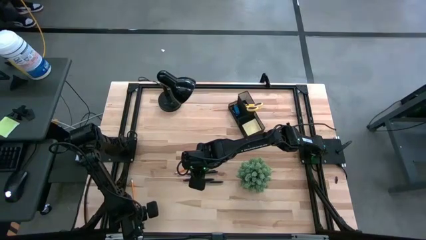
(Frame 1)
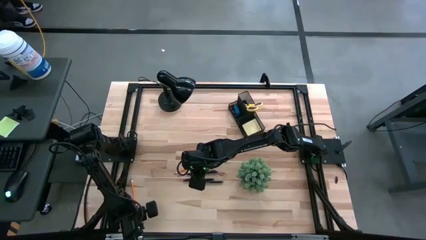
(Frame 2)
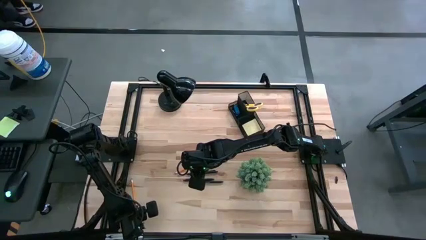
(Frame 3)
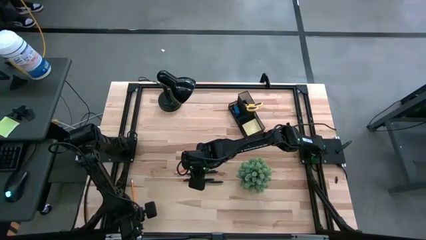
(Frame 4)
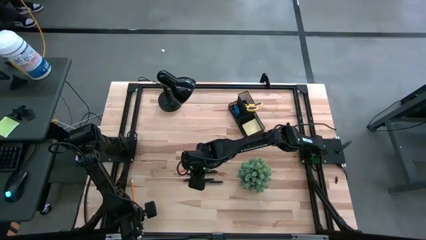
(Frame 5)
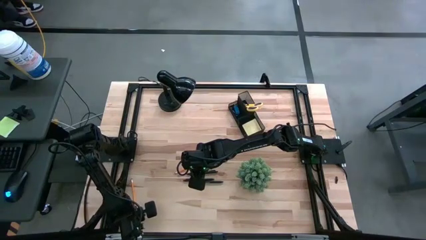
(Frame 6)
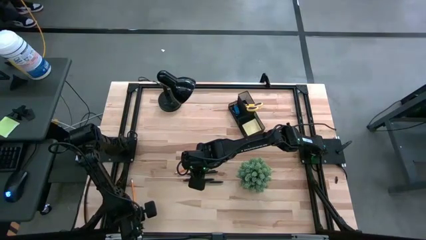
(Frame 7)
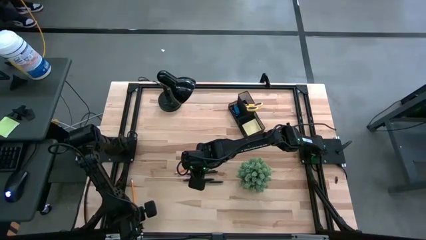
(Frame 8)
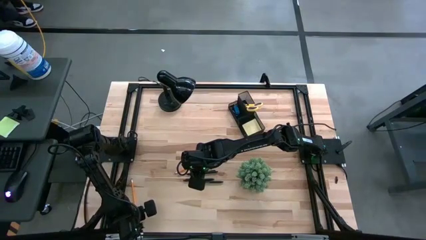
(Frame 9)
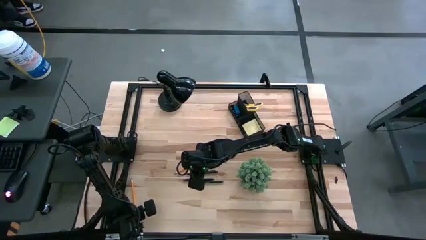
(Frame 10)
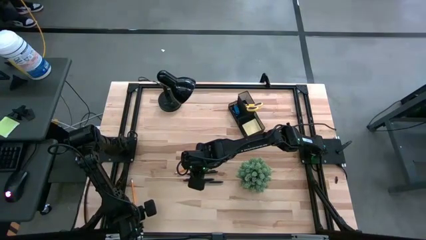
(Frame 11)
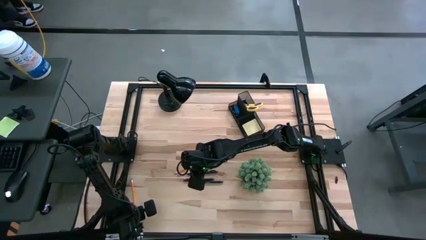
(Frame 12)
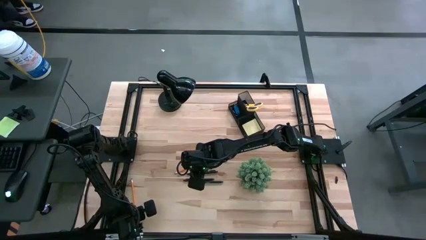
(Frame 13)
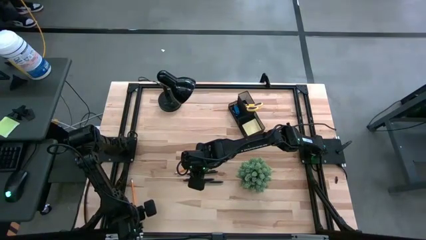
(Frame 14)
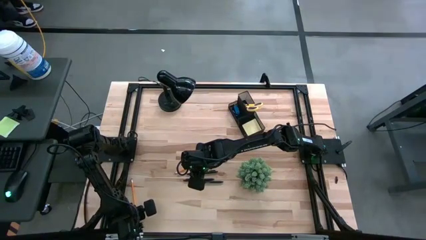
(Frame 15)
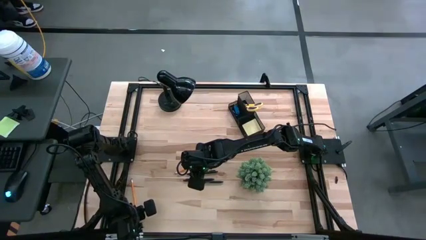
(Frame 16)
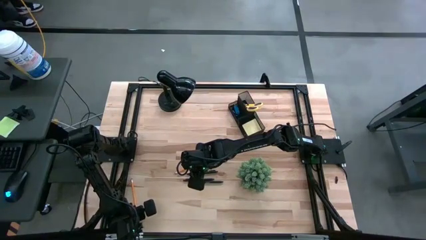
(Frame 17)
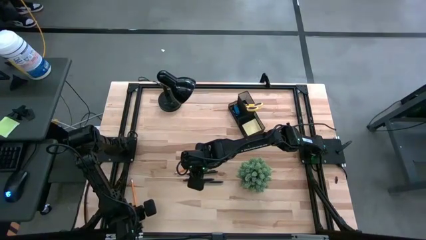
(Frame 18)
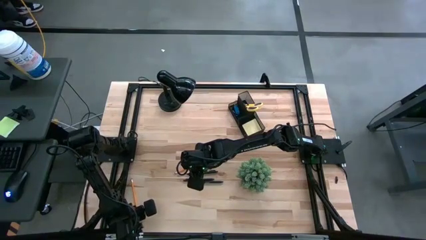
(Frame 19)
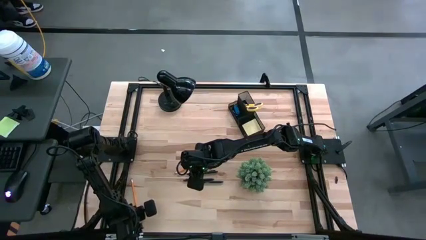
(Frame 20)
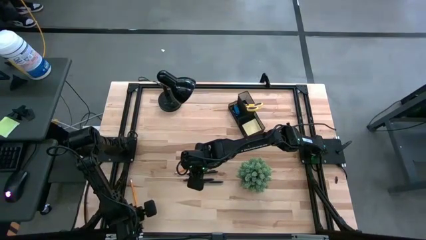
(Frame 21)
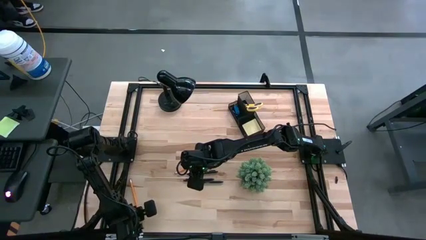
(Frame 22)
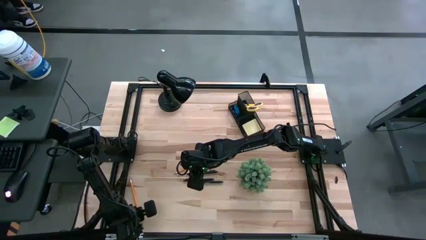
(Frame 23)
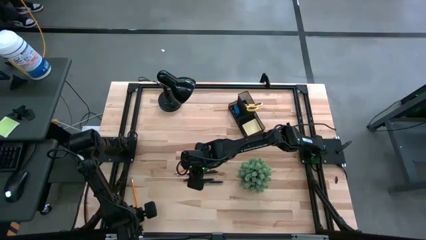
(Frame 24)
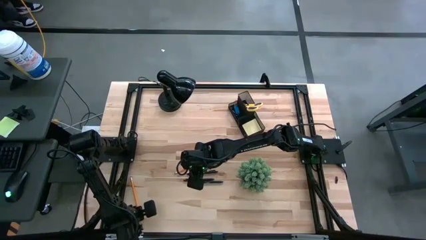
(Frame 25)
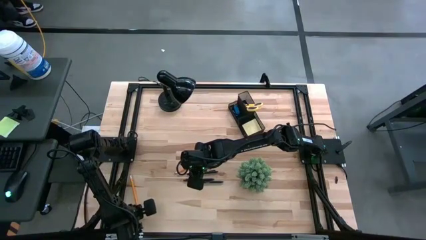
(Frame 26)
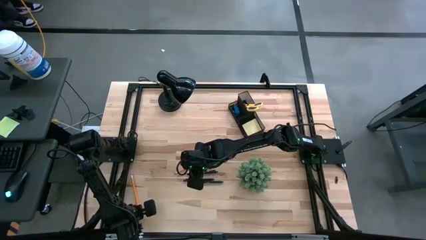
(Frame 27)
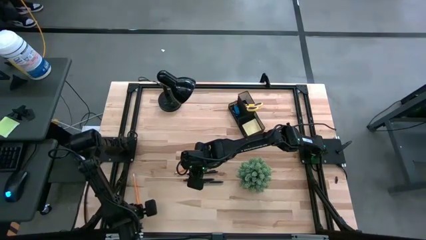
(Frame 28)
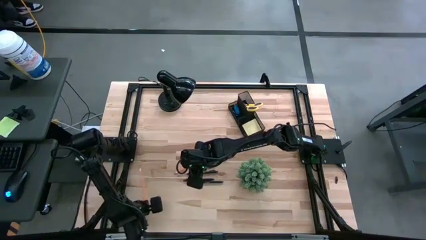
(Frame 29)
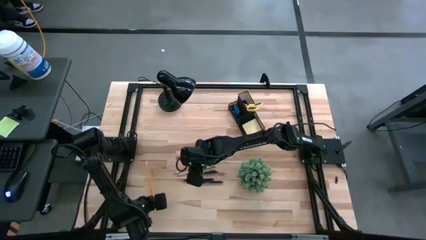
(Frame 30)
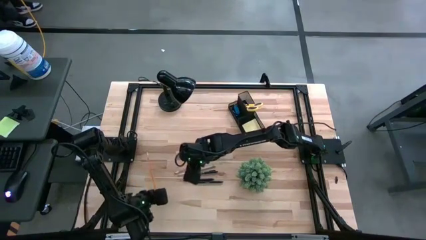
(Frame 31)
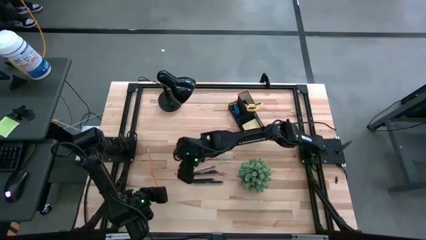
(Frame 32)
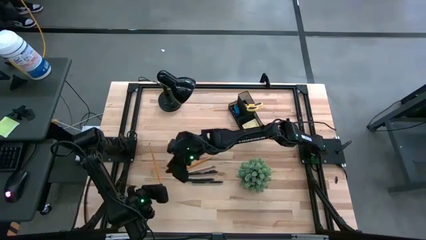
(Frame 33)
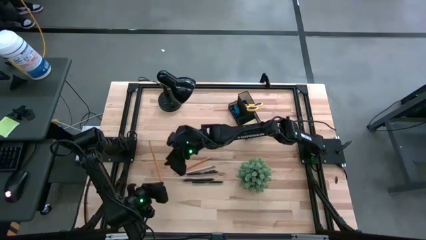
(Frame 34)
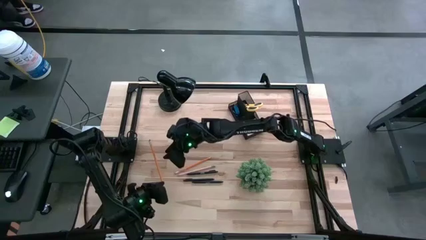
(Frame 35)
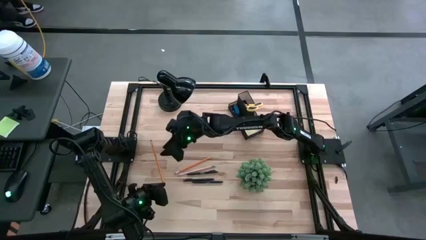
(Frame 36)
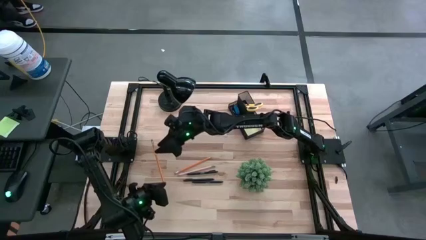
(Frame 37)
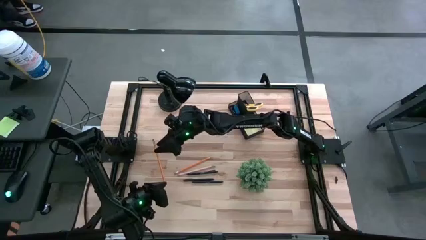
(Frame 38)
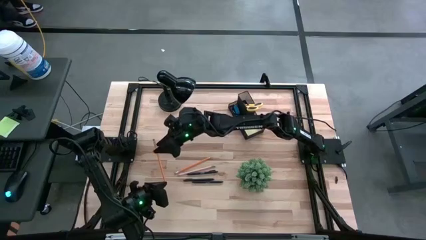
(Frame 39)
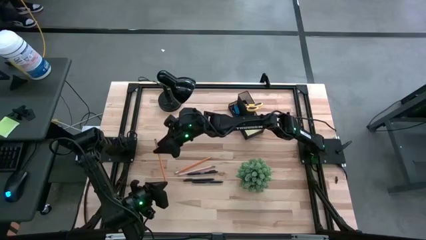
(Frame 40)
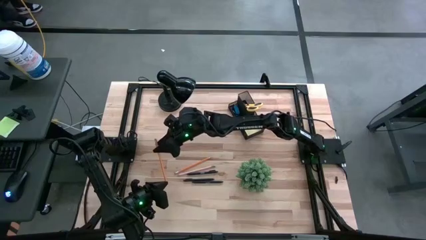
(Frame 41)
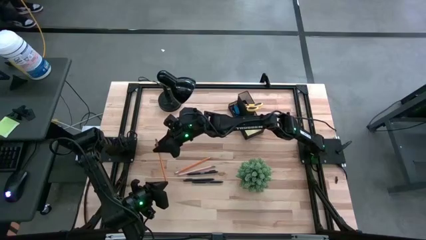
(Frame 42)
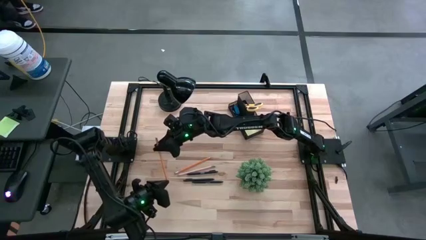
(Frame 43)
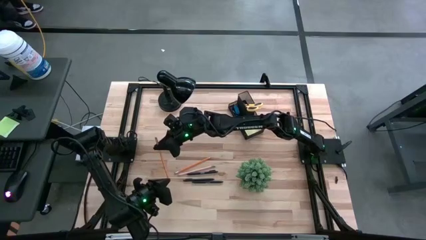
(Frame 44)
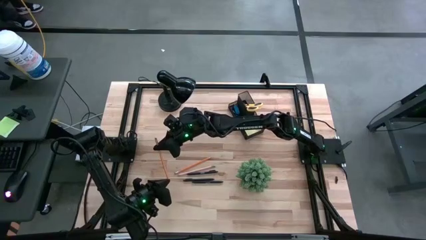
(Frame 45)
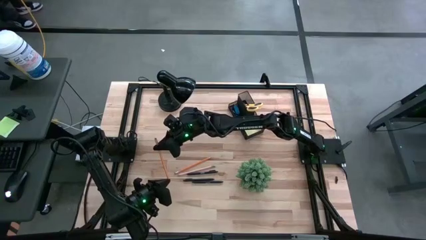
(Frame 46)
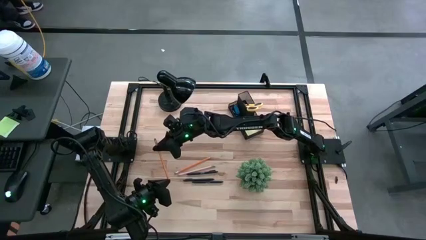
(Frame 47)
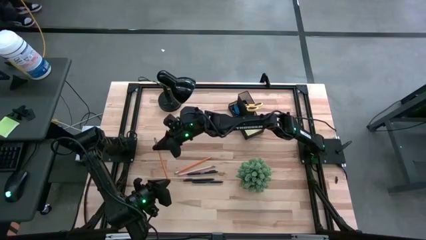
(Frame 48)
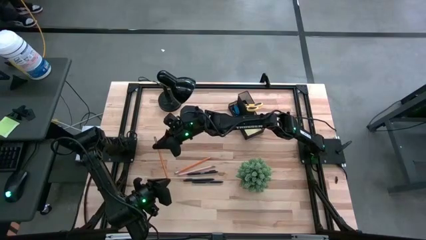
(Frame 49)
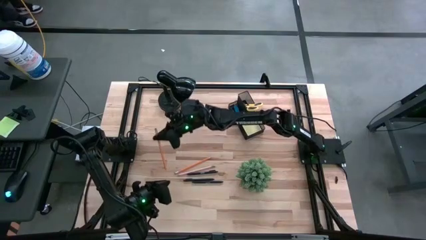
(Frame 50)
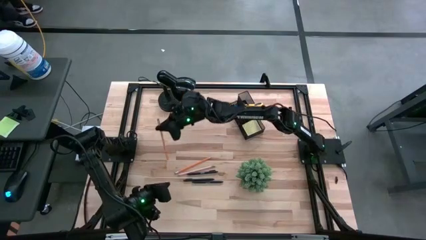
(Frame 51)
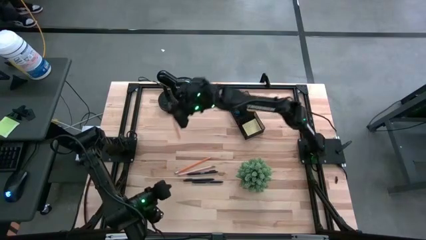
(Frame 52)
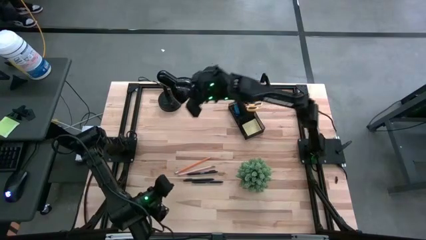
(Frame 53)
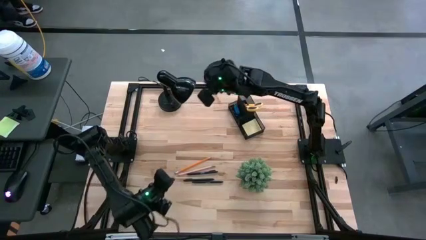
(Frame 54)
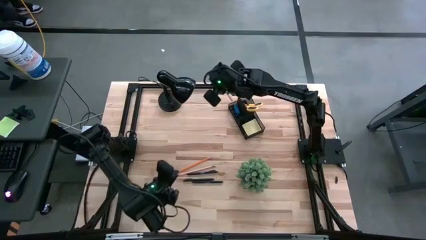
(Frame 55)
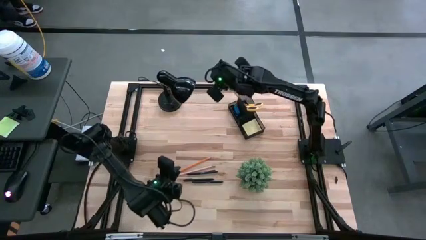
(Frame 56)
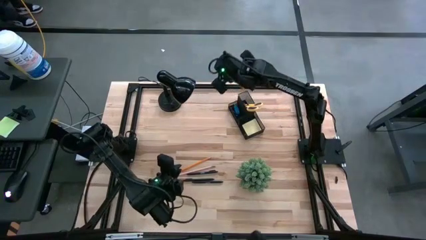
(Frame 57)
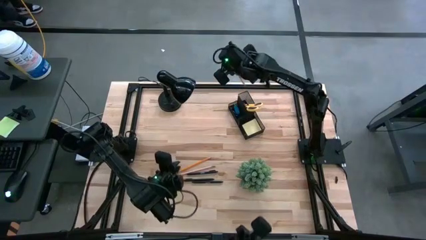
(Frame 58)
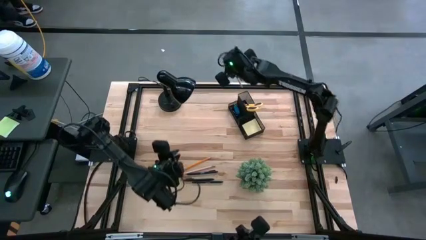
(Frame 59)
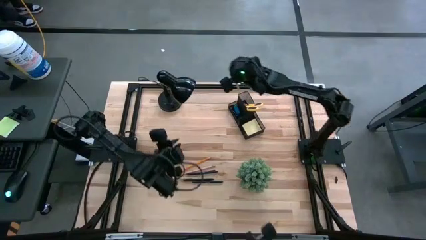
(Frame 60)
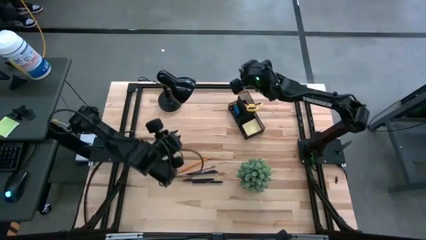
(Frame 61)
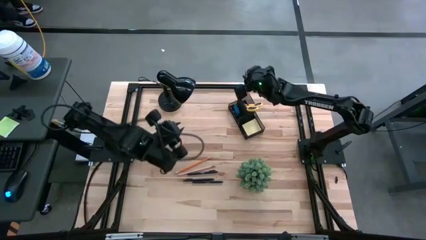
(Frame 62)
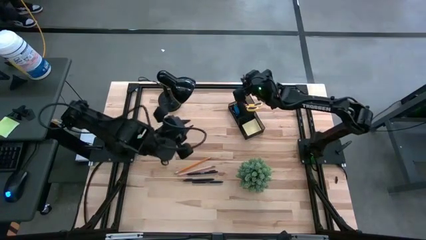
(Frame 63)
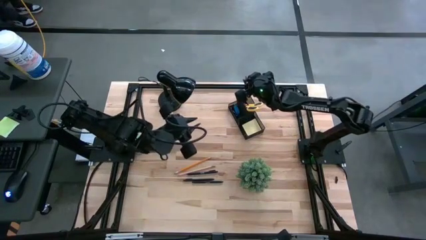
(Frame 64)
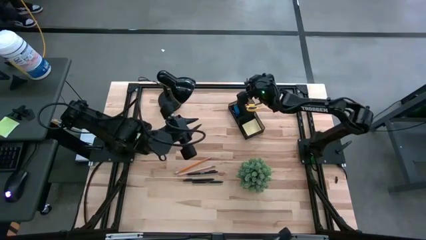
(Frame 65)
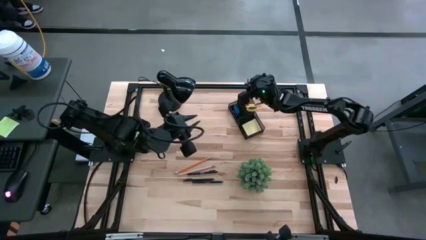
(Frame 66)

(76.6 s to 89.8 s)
Task: Pick and place office supplies into organizer
Put the bottom orange pencil into the desk organizer

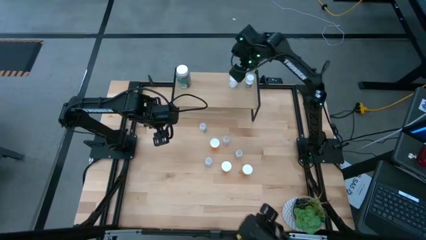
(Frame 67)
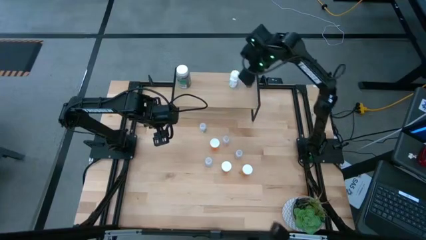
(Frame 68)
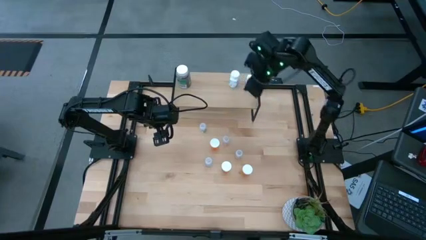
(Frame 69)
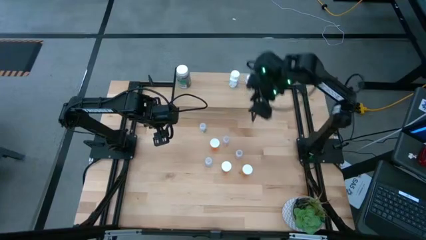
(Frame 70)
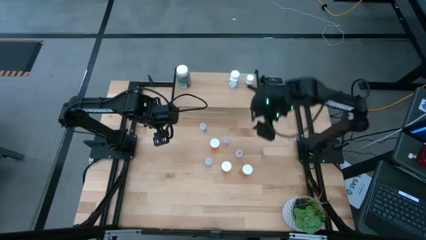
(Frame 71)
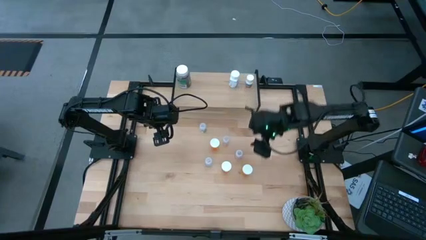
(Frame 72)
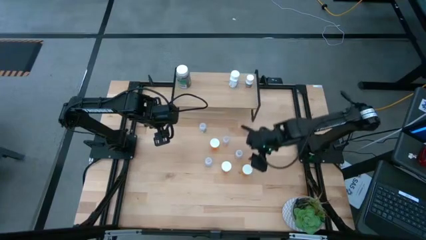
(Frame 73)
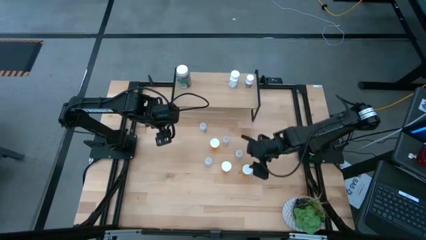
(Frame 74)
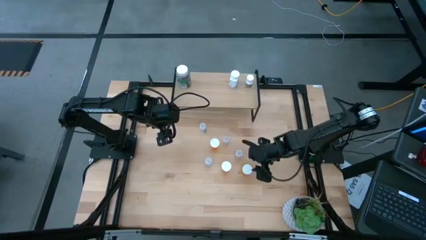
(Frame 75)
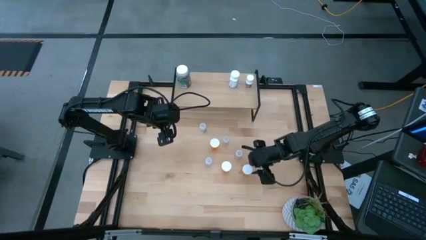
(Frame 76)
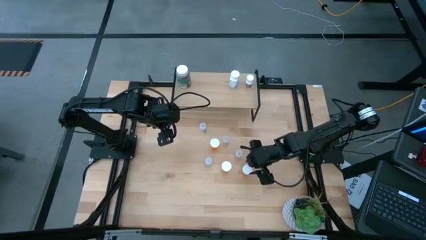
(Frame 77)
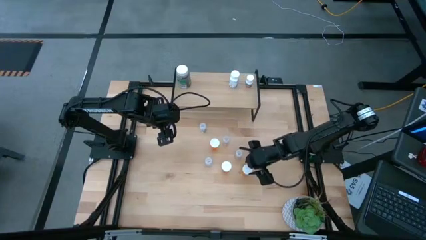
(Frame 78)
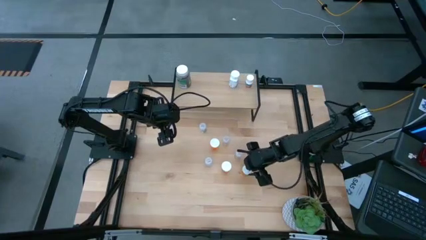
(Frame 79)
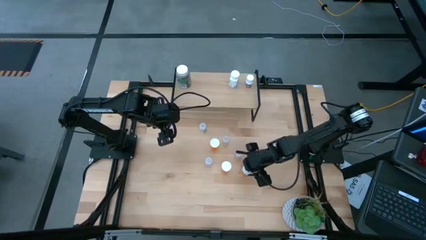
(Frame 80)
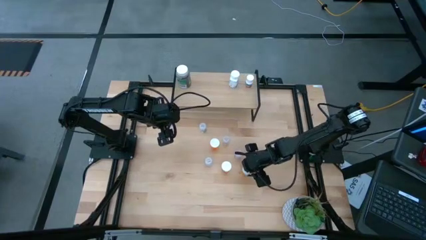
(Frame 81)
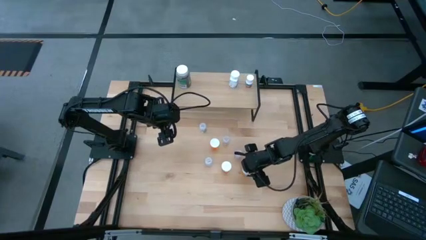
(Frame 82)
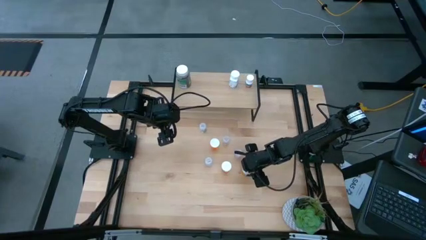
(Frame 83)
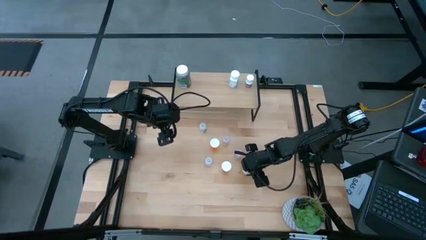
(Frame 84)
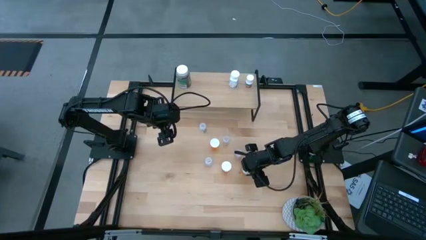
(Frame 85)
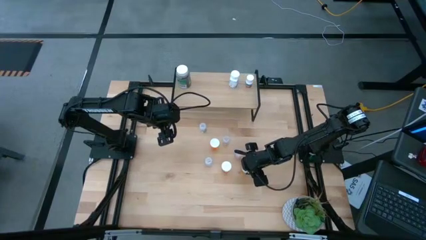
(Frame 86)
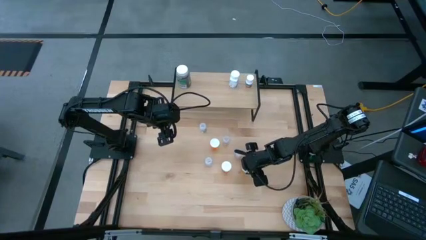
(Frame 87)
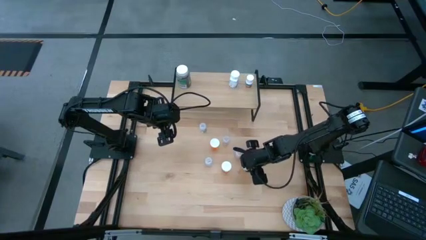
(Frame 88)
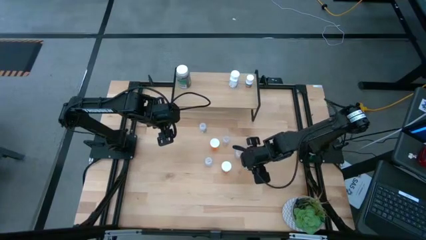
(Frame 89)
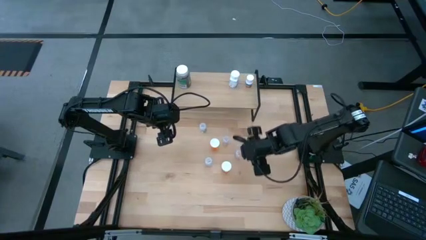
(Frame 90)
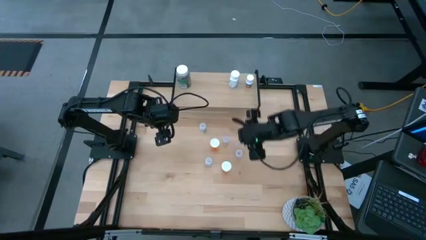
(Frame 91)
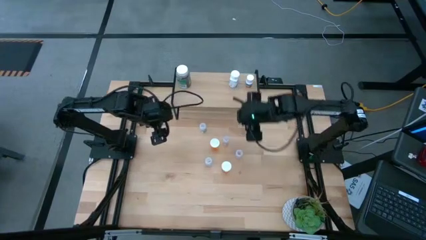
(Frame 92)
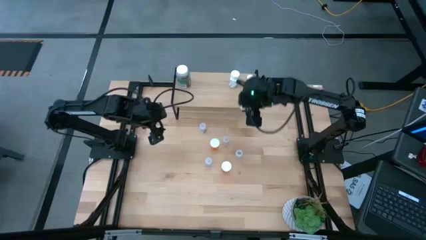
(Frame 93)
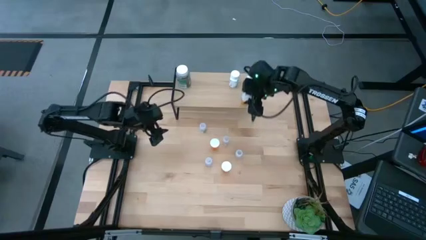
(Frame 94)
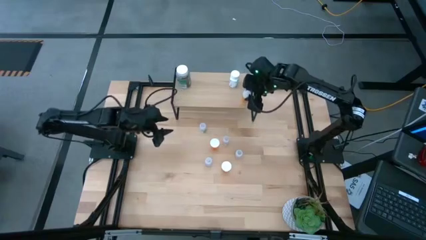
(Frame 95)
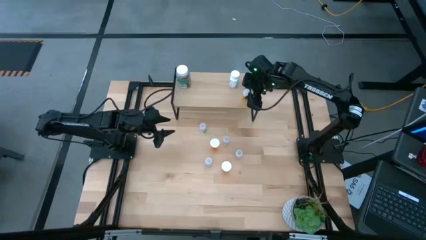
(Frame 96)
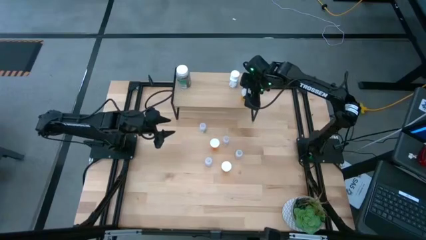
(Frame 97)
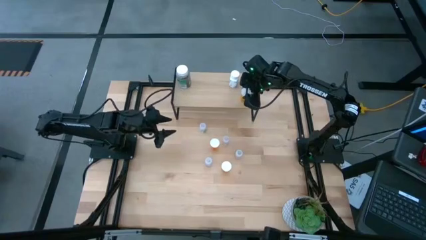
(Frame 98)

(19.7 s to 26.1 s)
Task: Pick and place medicine bottles onto shelf by color
Put the orange pill bottle on the shelf
